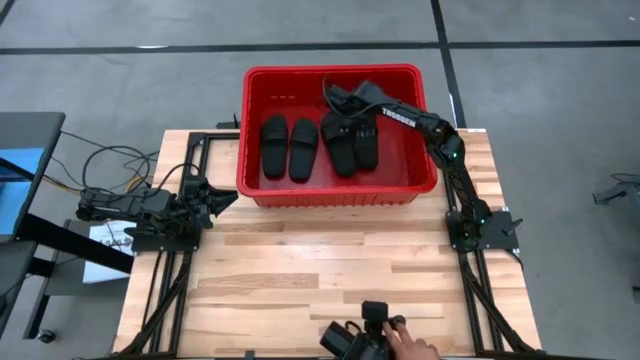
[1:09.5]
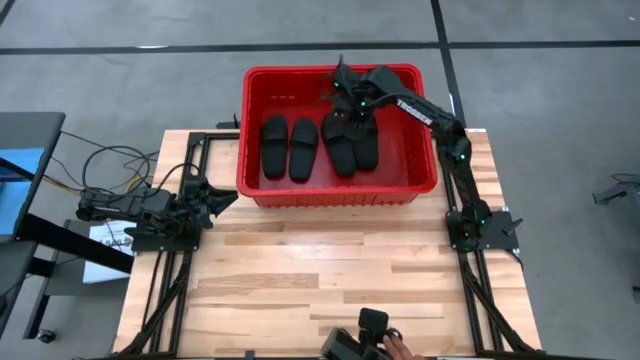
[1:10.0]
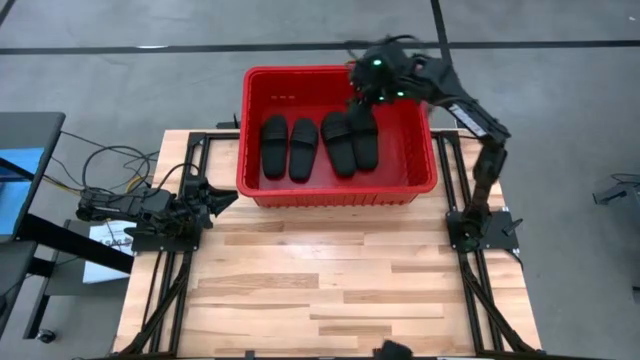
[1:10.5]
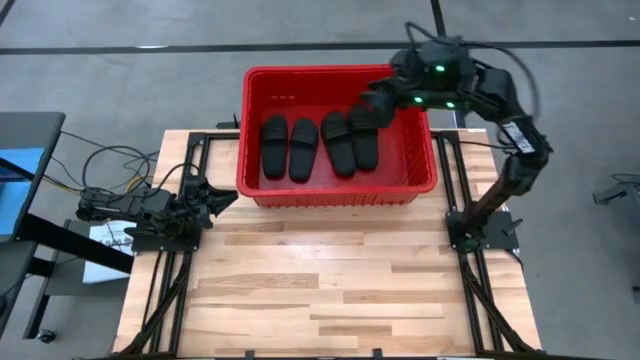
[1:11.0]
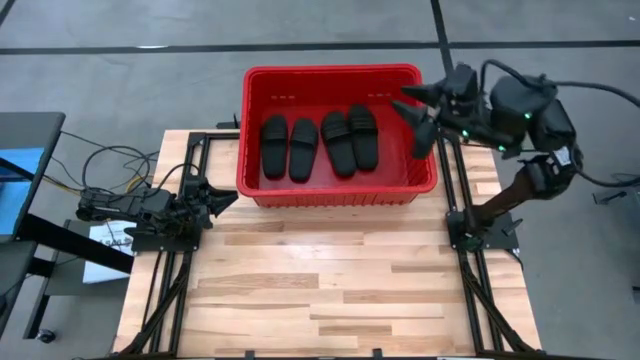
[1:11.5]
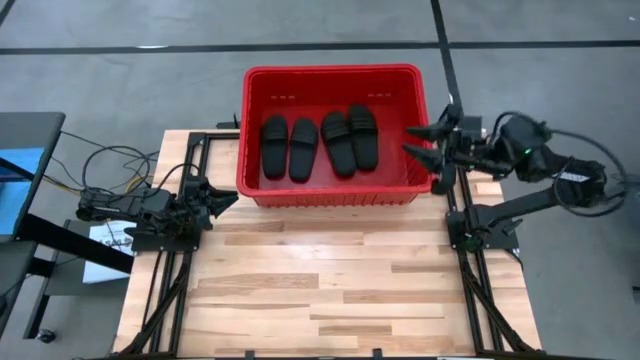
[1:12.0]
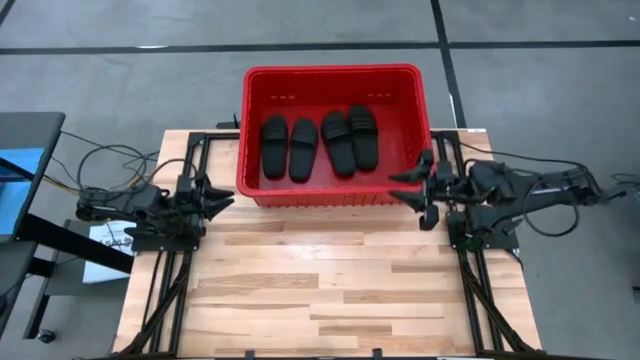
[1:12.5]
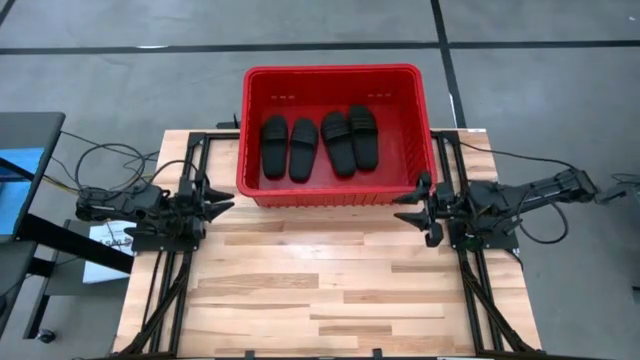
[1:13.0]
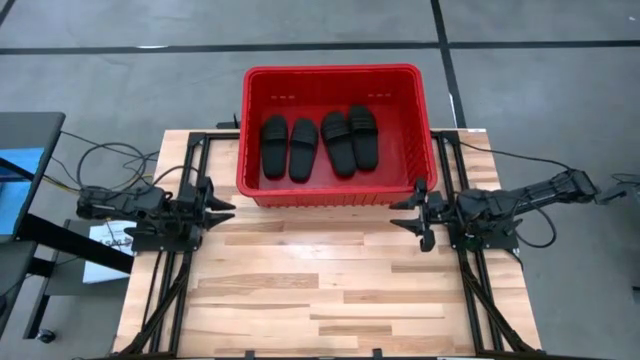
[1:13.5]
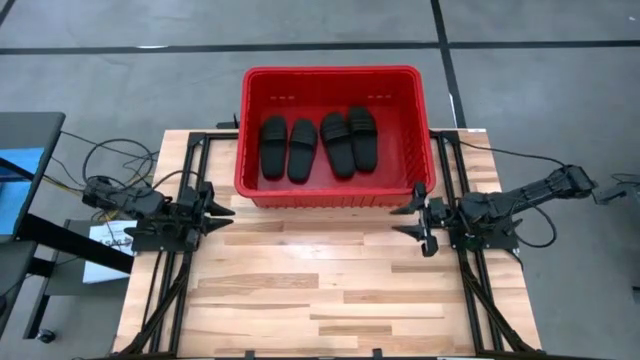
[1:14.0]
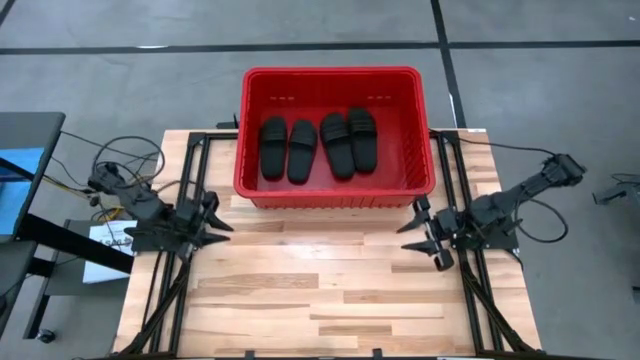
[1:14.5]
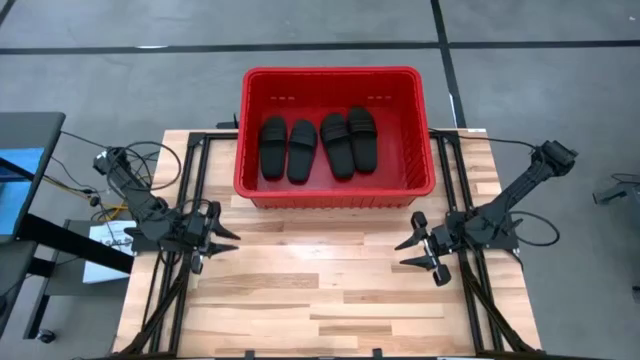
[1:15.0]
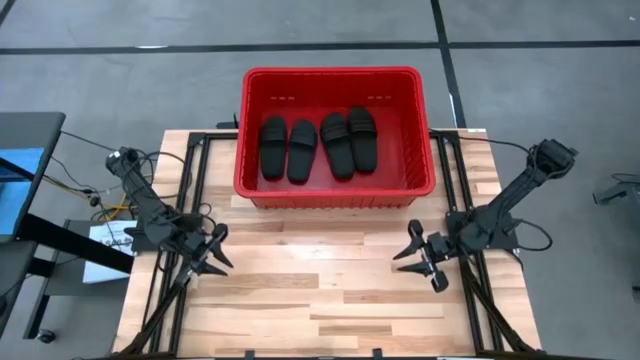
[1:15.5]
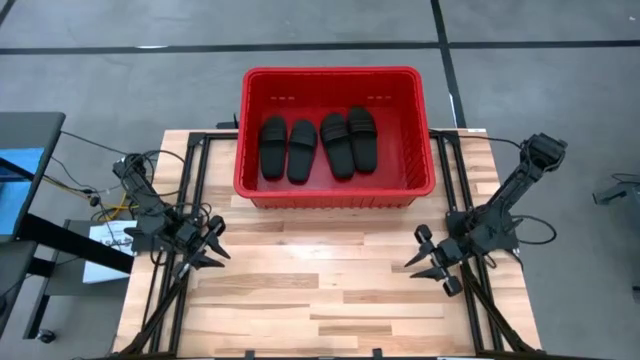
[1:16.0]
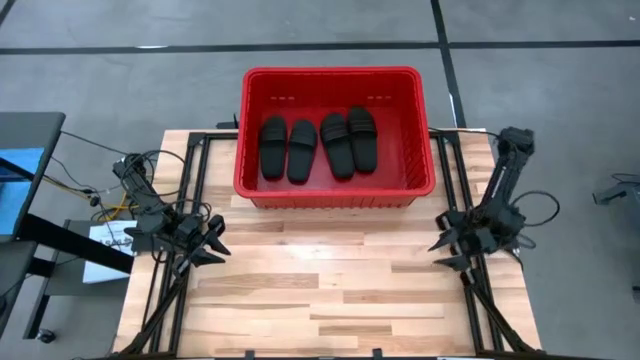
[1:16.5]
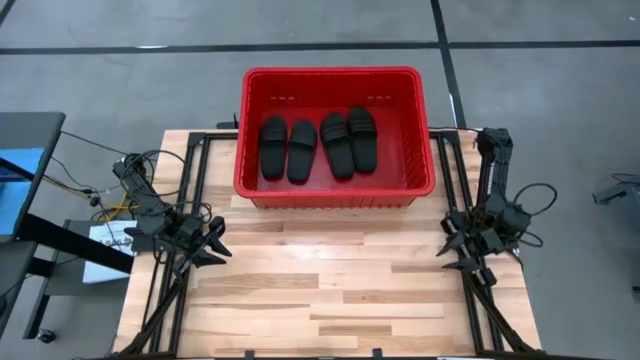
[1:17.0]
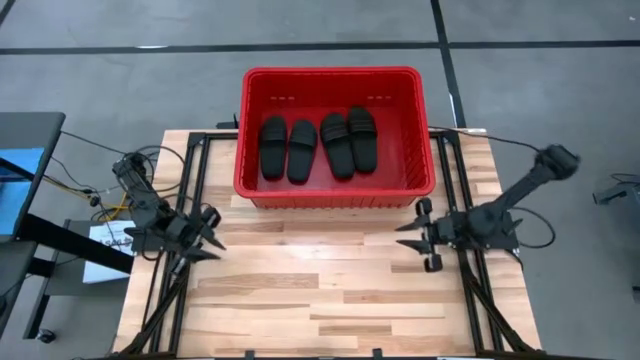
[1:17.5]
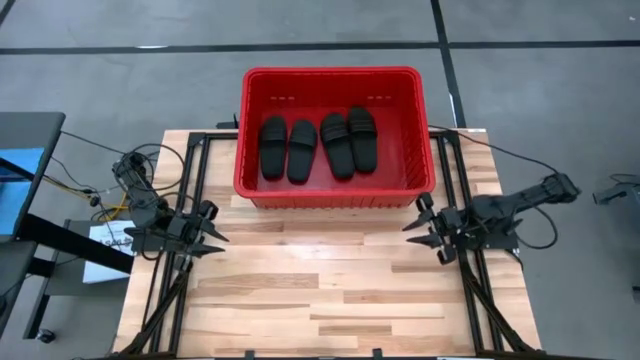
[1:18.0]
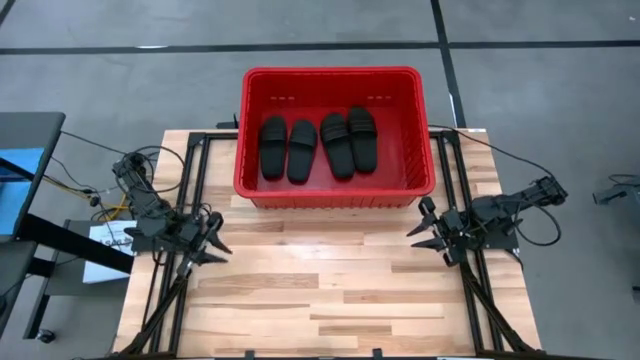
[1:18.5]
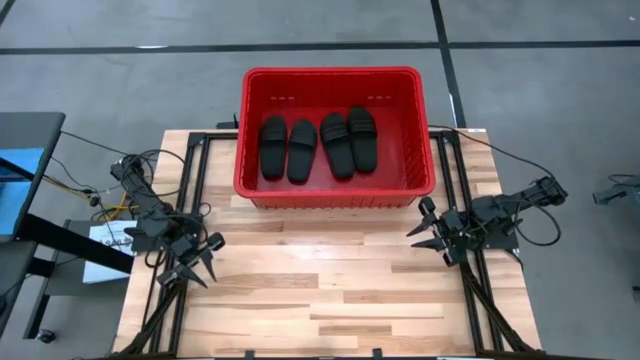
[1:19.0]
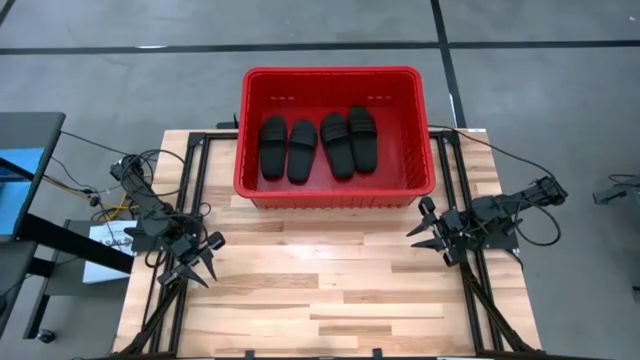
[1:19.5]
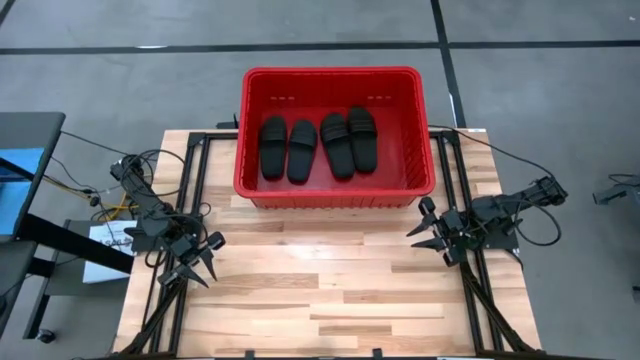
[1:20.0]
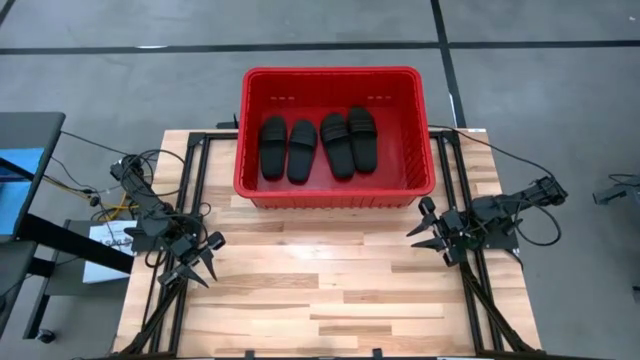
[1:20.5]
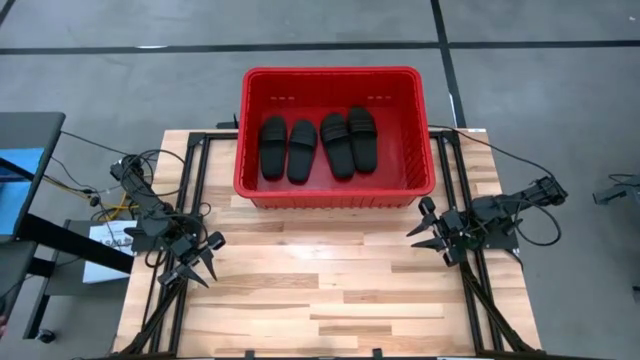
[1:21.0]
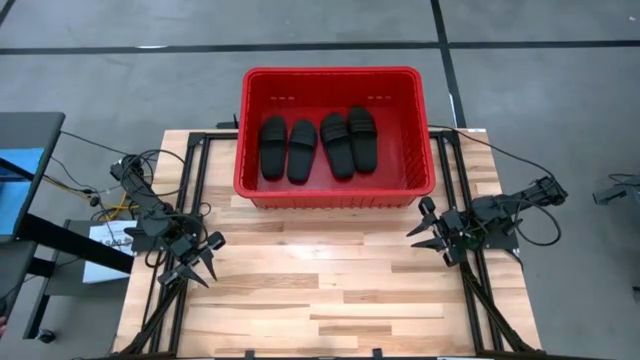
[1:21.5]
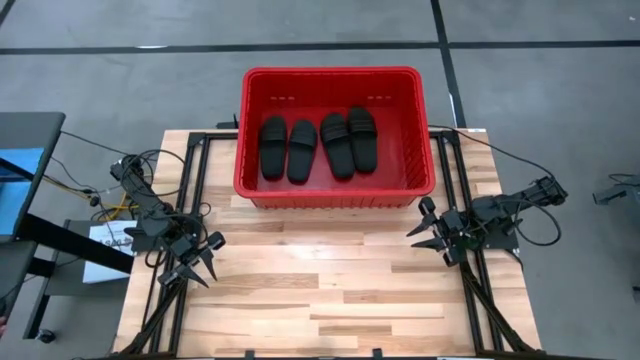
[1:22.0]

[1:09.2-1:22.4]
Task: Pick and place slides into bin
Return to Home Position
